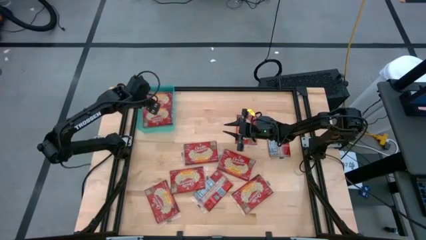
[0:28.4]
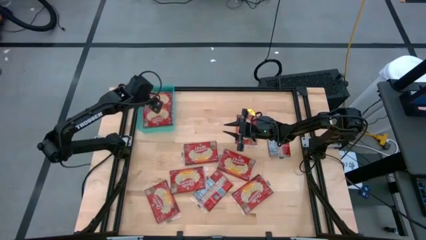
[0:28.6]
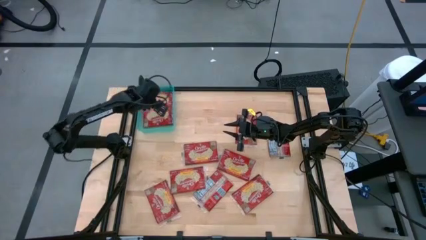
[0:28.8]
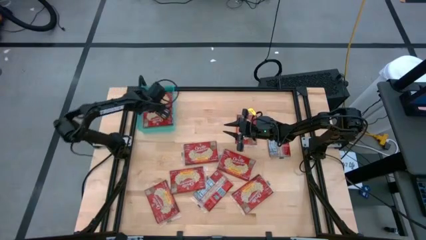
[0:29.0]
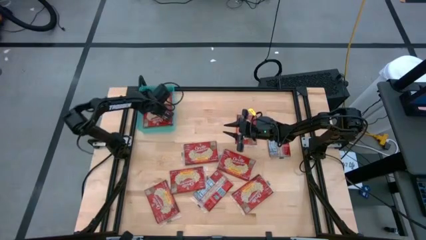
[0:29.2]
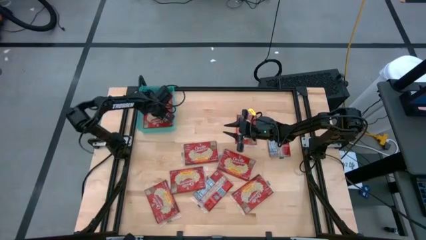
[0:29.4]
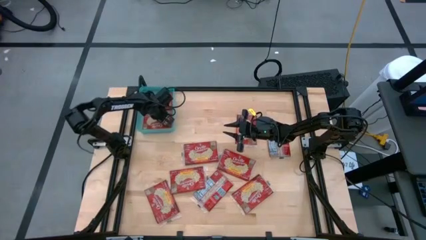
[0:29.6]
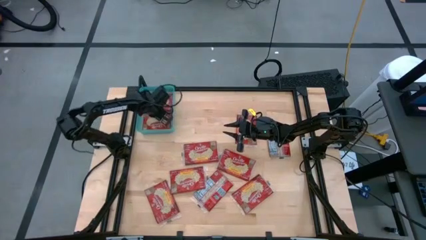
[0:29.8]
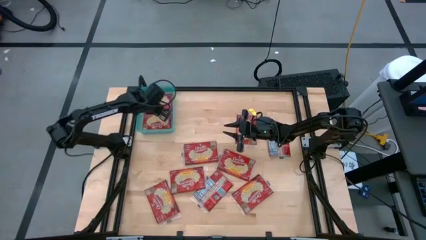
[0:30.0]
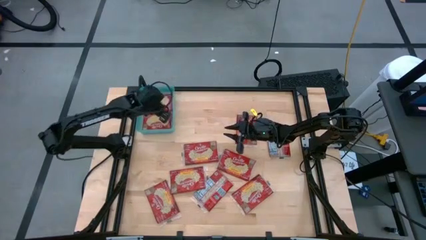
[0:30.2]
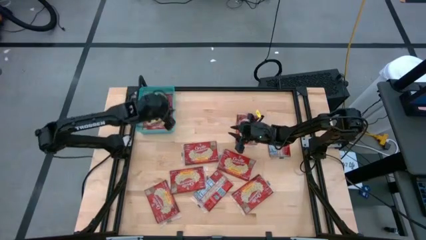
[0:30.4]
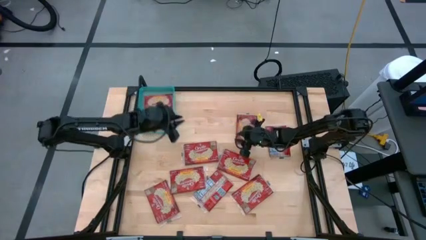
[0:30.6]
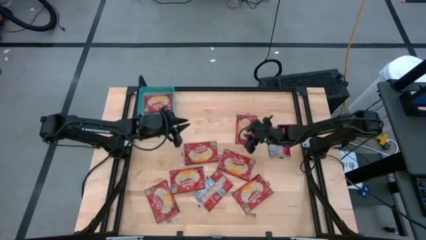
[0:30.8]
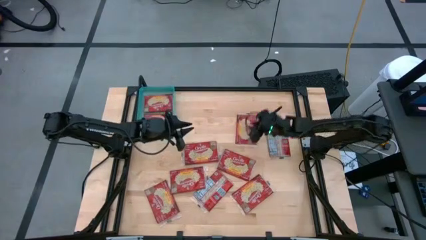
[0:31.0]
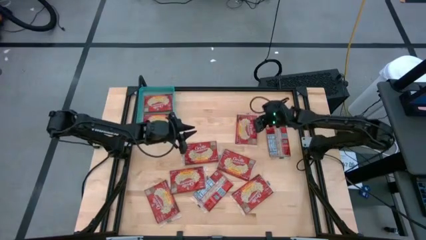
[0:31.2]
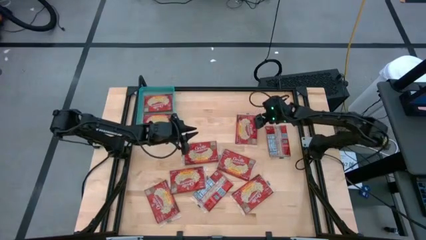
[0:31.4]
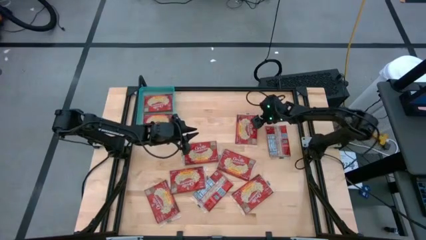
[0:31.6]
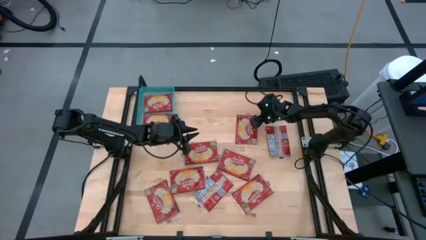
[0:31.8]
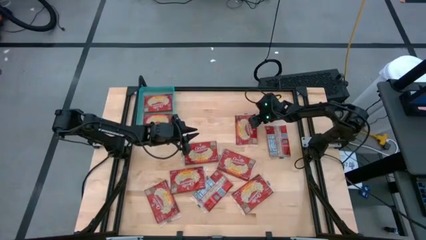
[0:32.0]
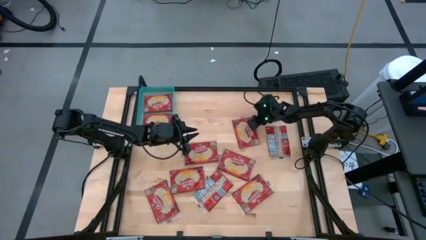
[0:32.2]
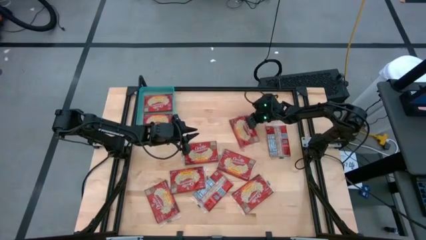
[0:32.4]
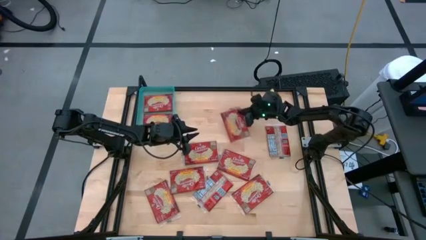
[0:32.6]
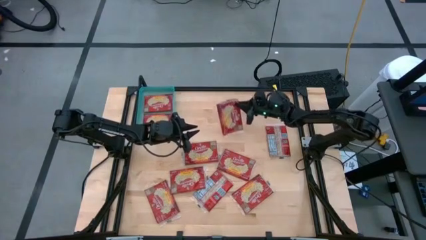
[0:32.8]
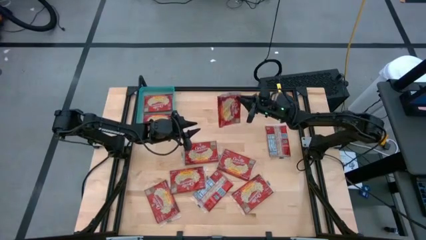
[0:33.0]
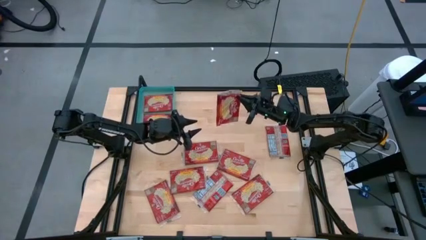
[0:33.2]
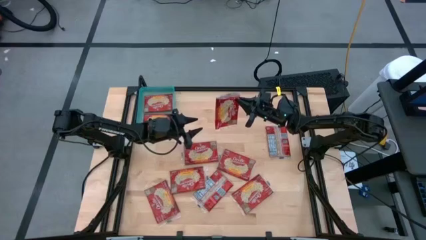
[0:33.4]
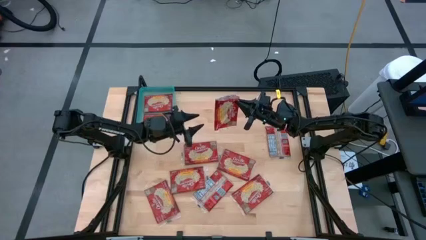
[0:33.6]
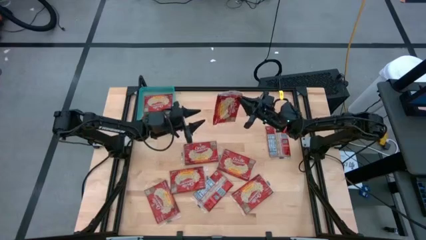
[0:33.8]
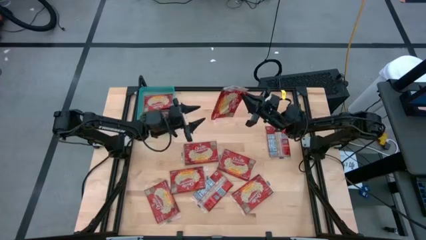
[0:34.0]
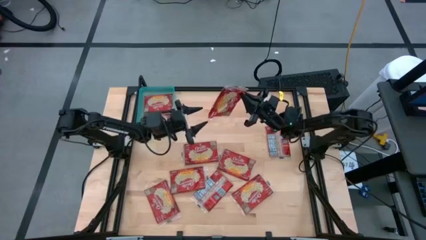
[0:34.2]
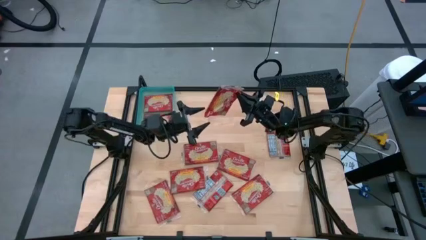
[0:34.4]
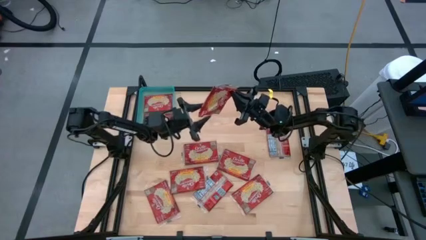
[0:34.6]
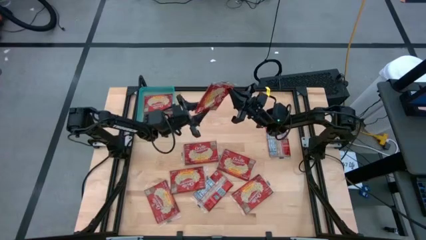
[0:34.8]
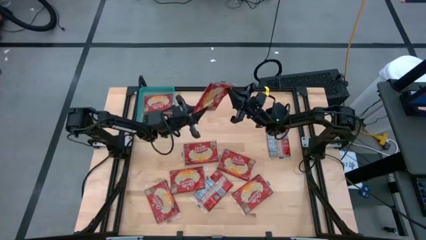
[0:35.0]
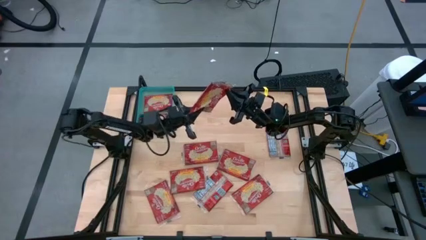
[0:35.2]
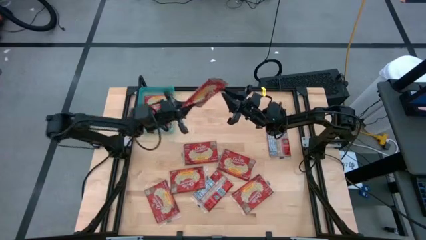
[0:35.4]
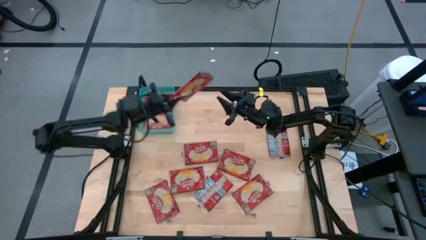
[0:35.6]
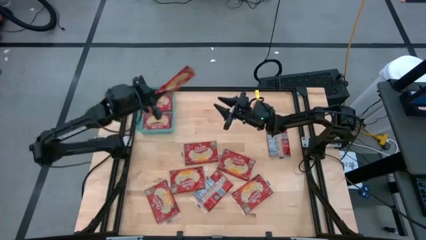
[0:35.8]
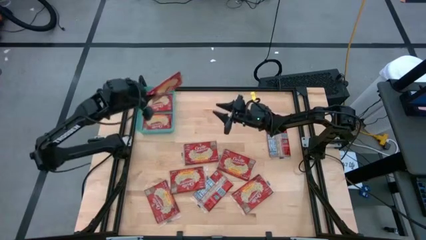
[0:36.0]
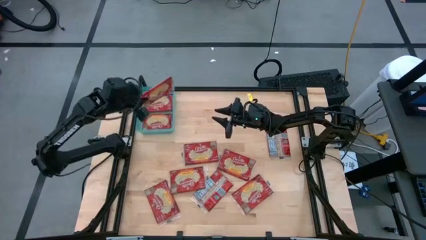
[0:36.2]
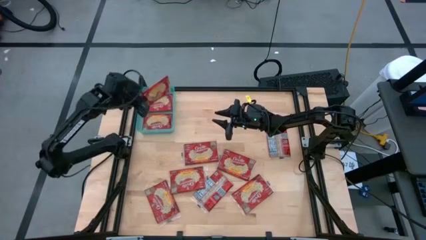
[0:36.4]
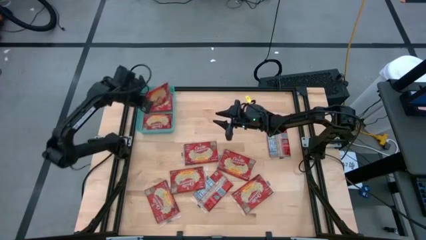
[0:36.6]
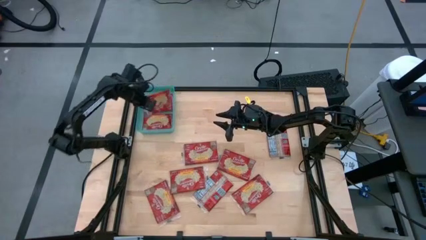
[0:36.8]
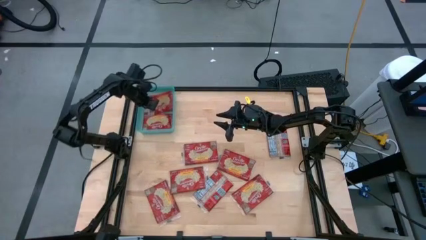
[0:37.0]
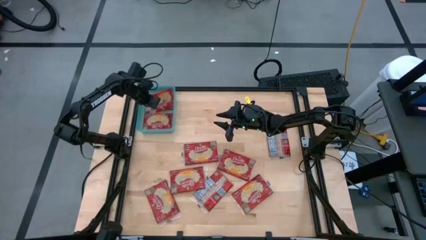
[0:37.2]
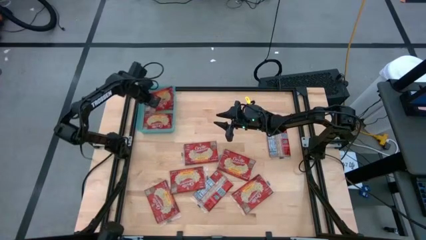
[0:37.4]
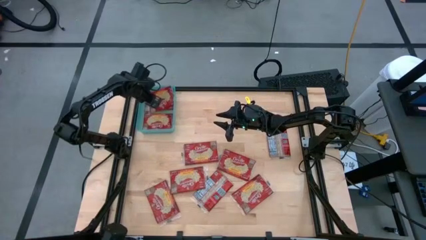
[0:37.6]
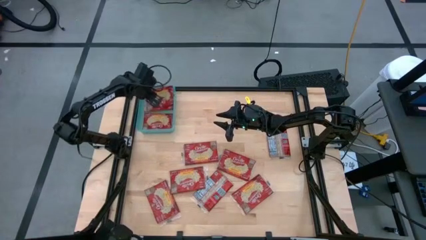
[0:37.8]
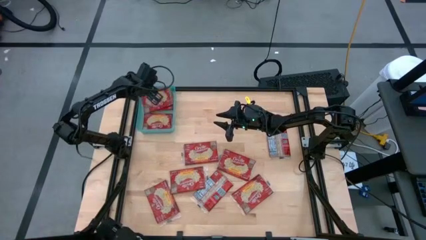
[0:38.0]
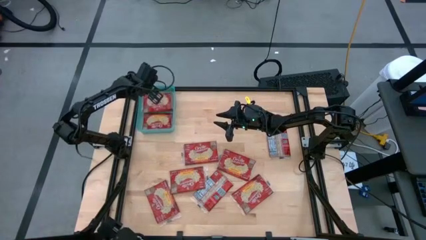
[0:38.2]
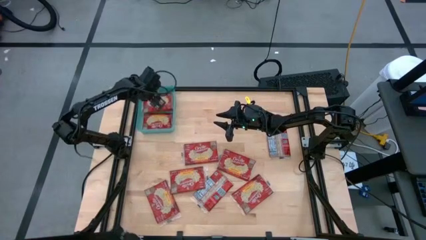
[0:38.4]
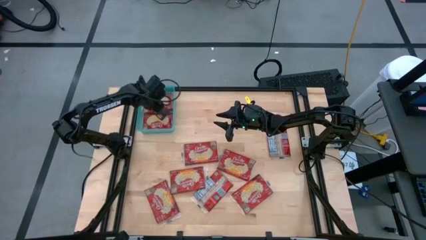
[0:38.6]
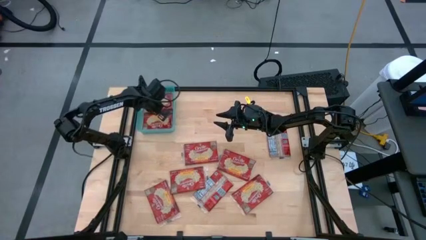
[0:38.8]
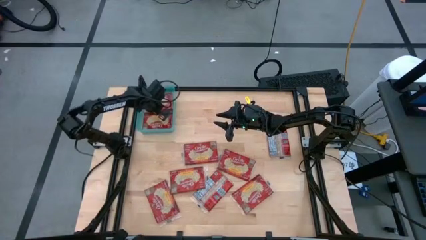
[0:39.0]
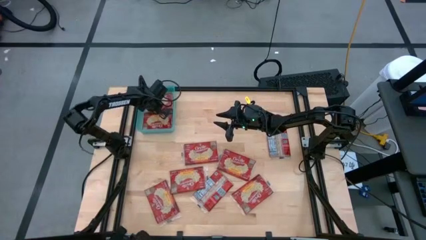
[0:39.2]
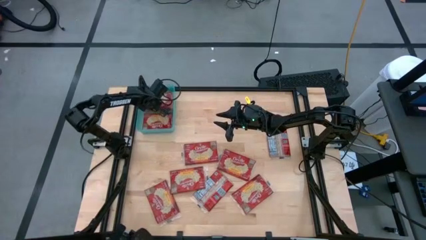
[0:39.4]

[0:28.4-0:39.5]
Task: Sort popcorn bags into baskets
Put the popcorn bag into the blue bin
